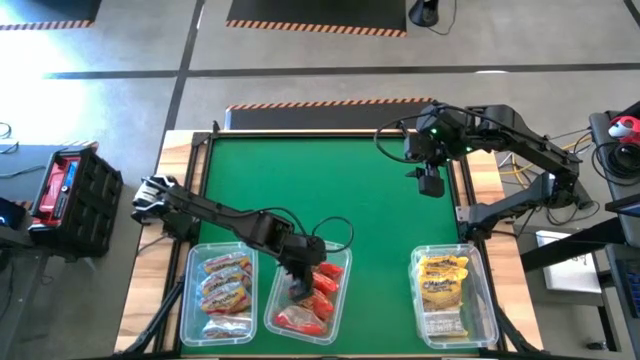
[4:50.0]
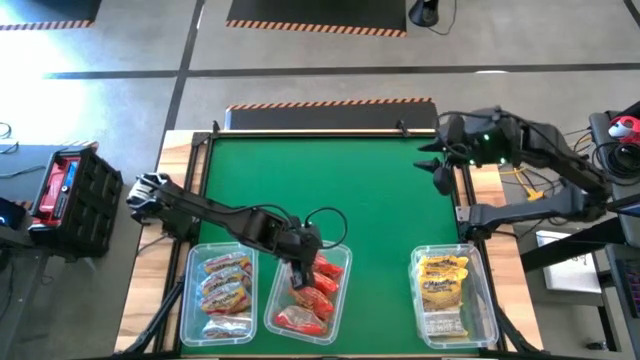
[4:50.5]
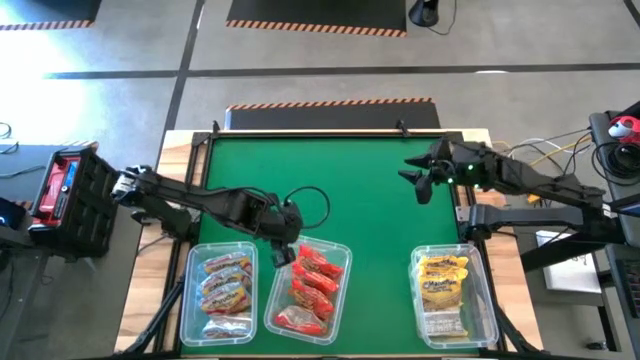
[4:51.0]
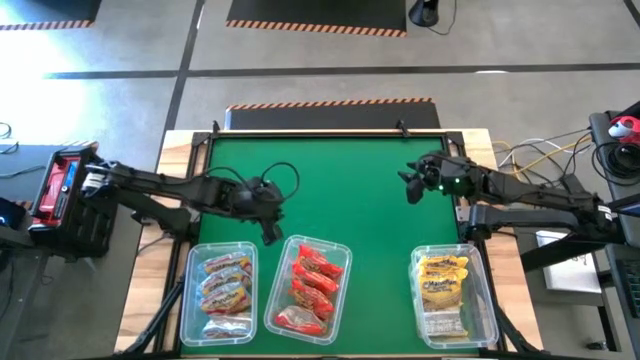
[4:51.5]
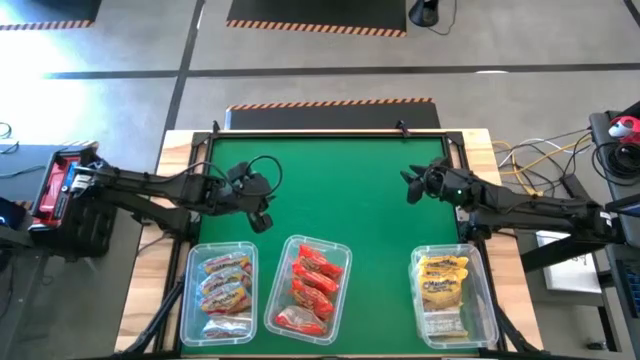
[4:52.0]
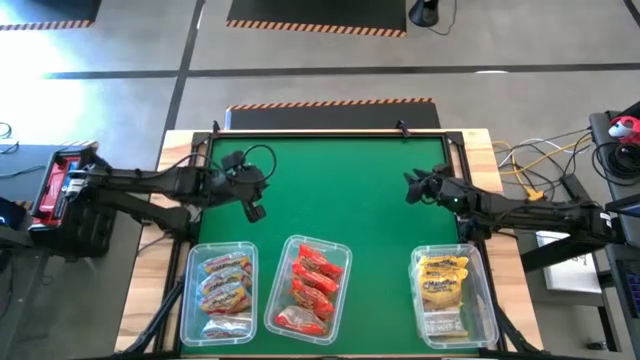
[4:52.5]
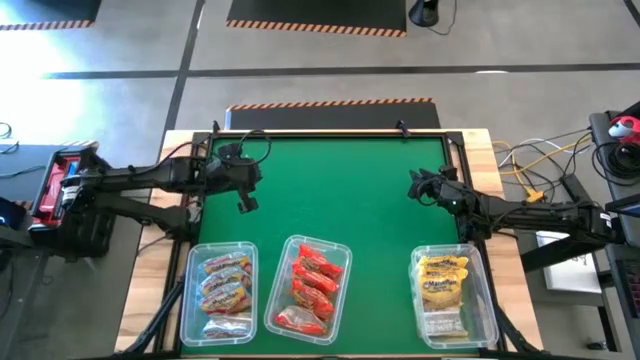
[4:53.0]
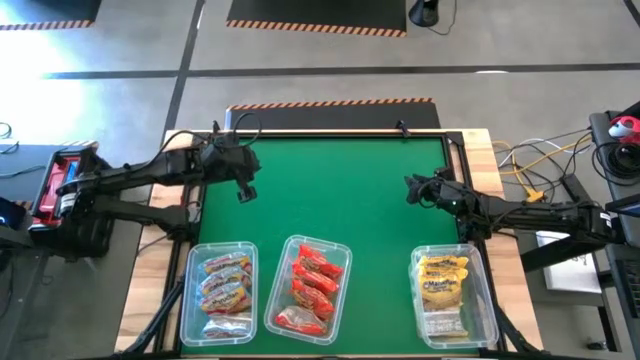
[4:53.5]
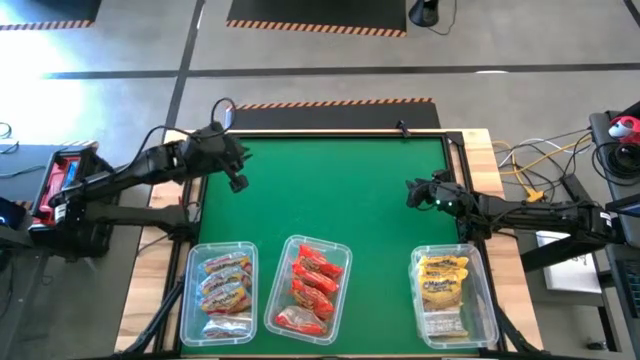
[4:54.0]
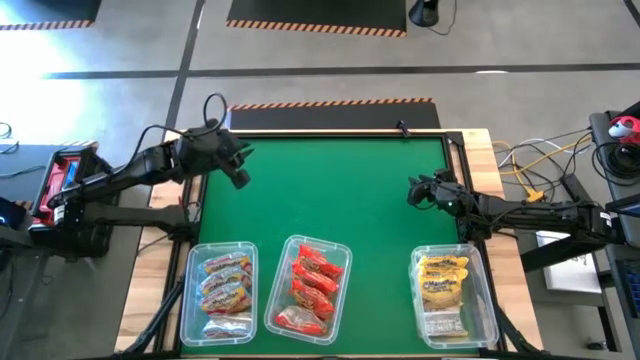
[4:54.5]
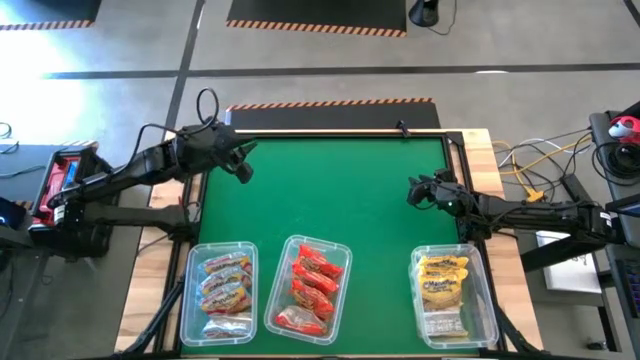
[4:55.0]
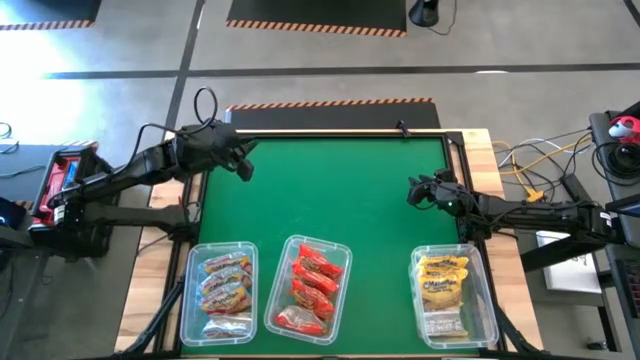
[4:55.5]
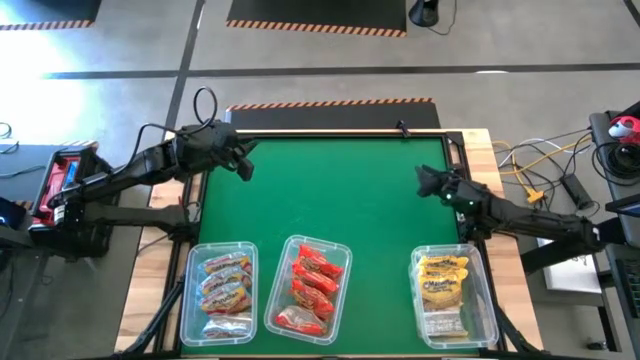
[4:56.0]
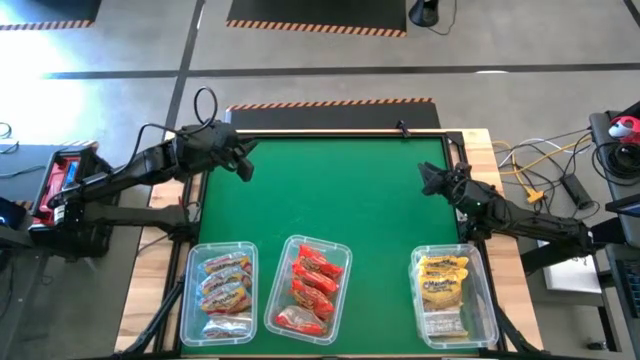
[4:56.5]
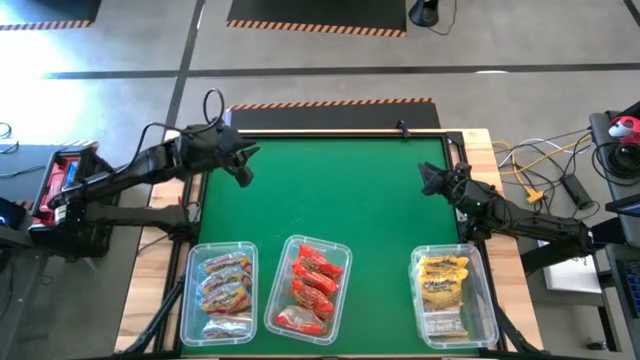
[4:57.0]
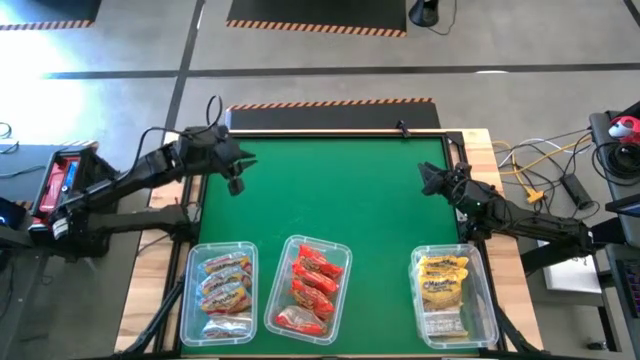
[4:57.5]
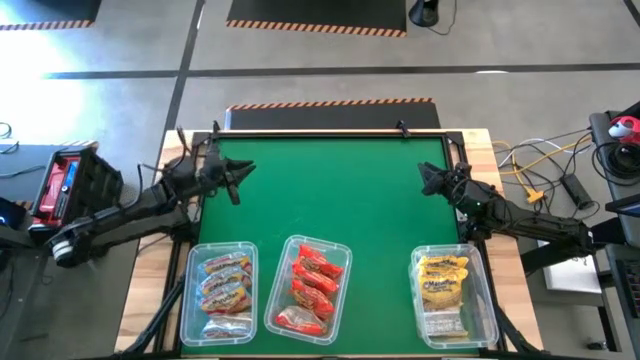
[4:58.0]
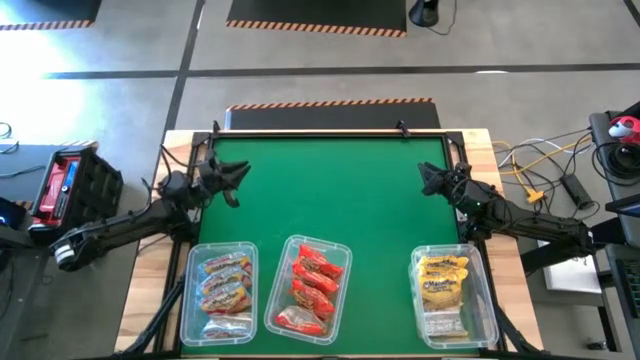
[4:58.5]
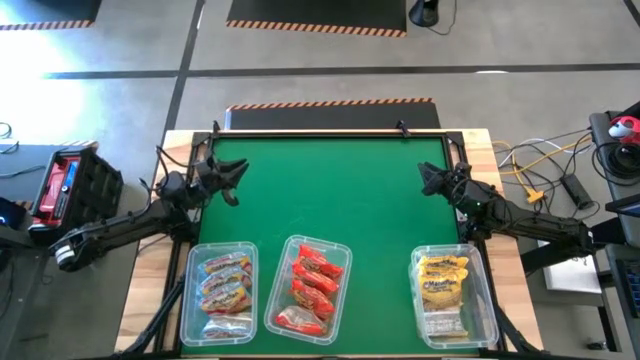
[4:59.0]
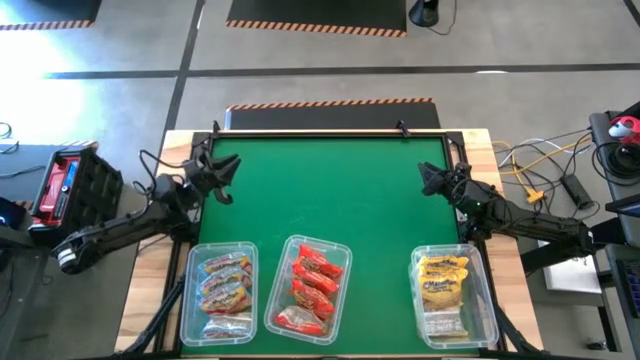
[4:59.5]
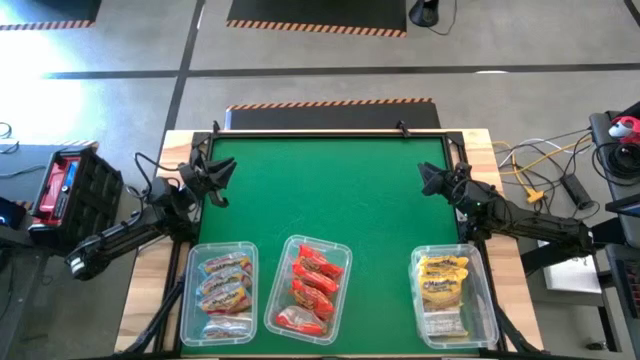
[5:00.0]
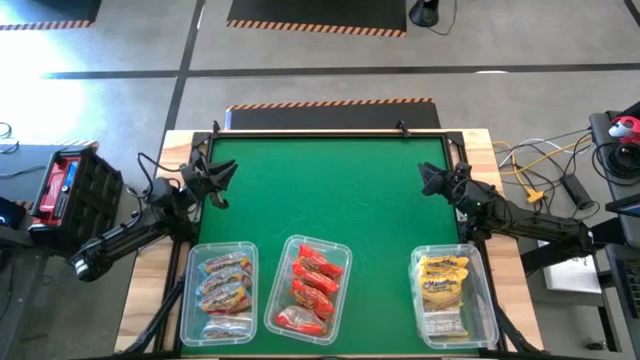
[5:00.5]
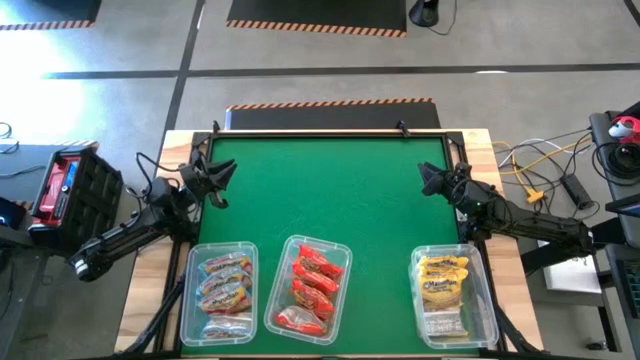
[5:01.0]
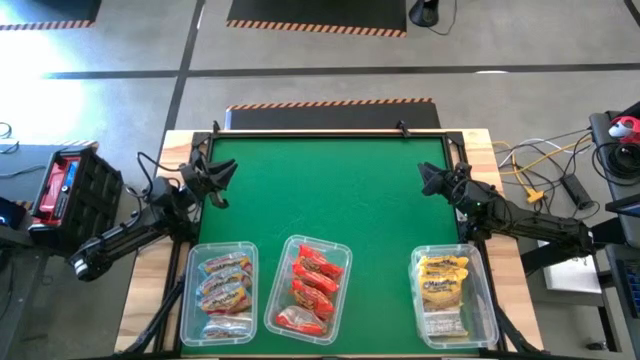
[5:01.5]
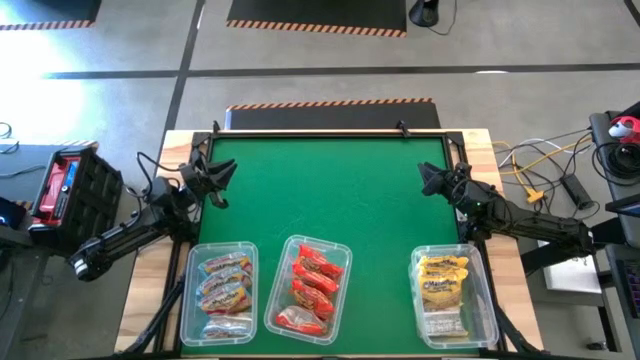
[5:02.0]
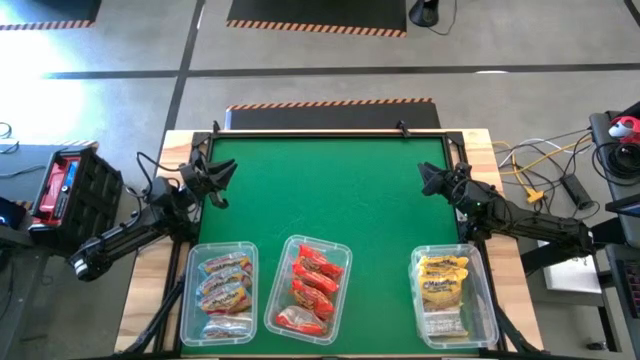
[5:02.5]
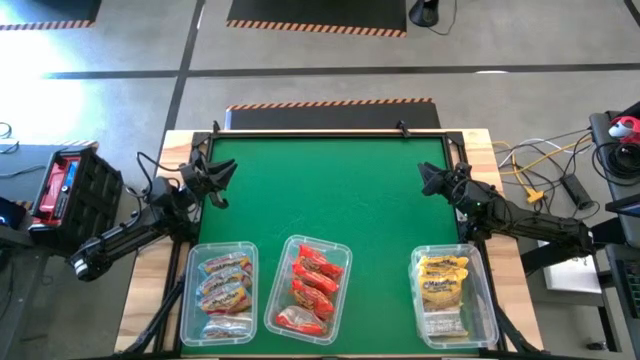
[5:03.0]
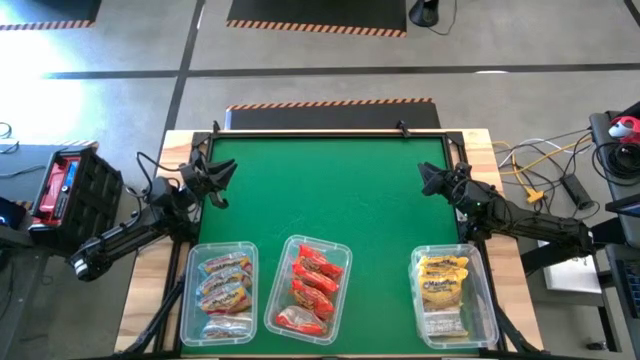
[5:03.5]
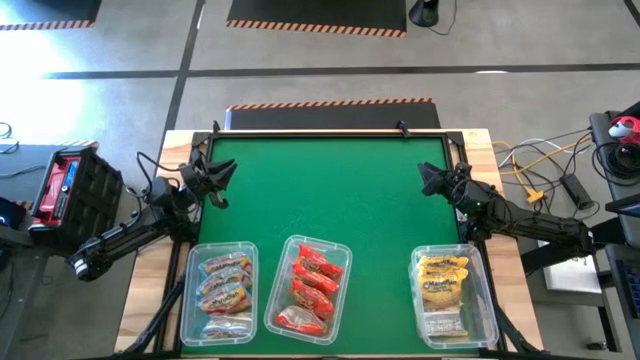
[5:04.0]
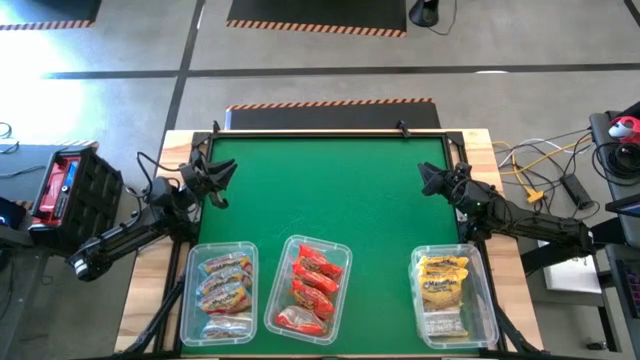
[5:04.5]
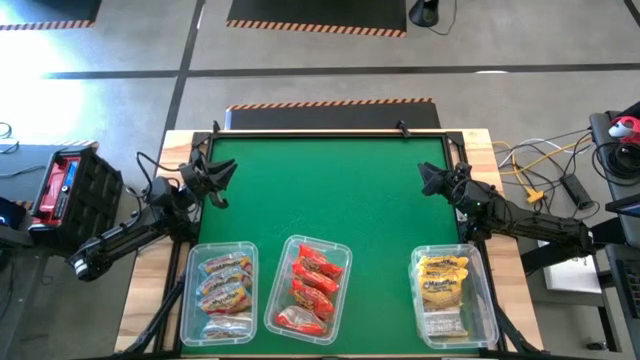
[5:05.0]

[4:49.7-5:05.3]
Task: Sort Maruchan noodles
Return to Home Position

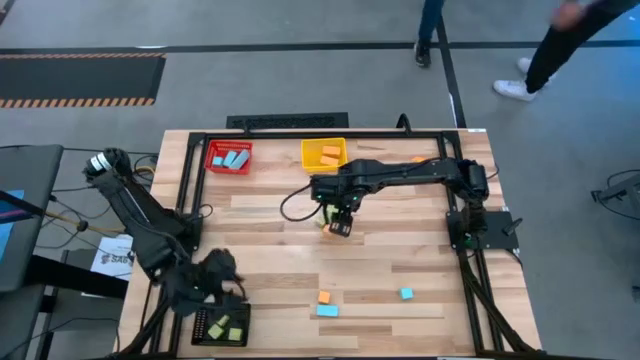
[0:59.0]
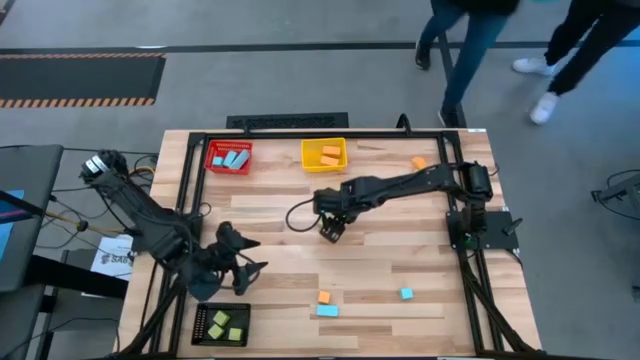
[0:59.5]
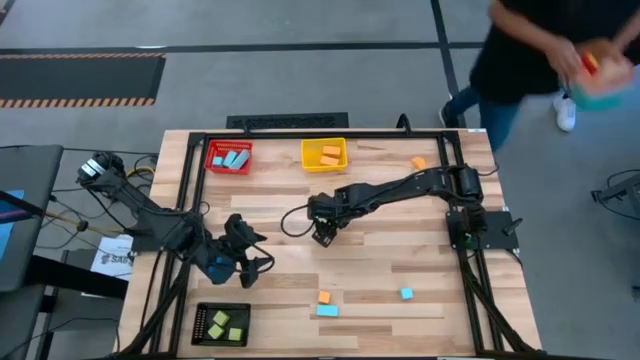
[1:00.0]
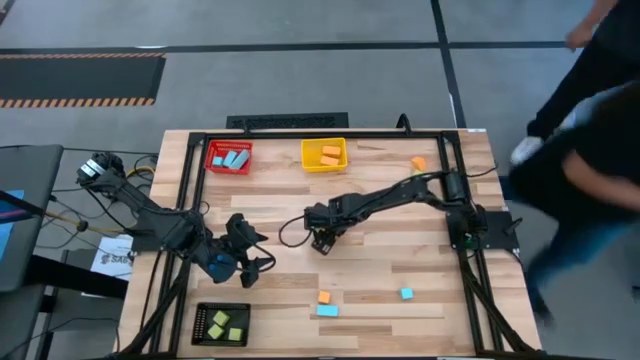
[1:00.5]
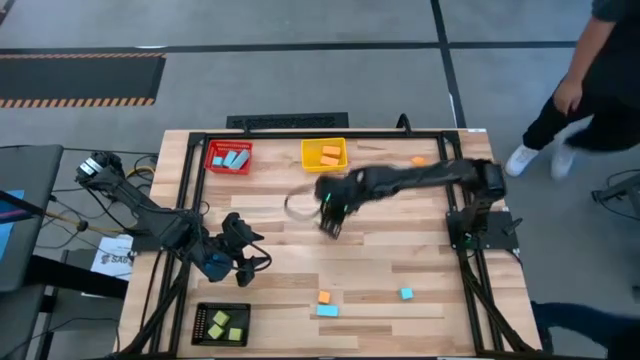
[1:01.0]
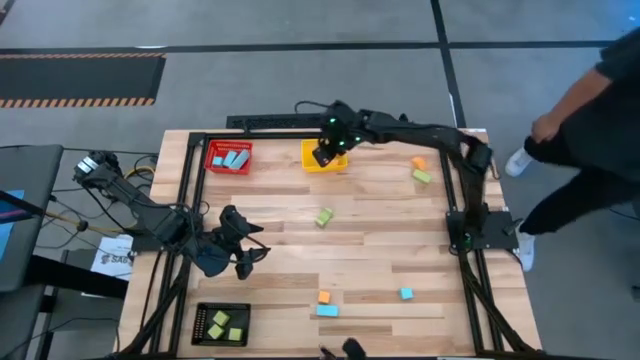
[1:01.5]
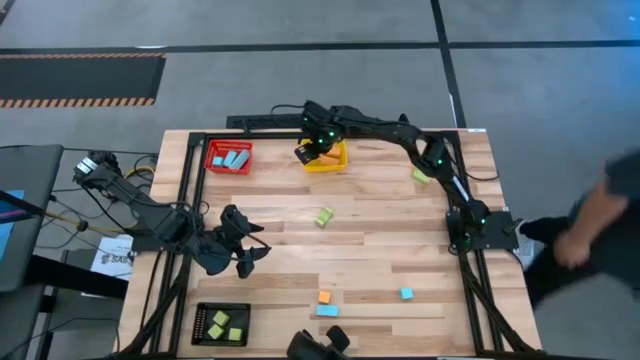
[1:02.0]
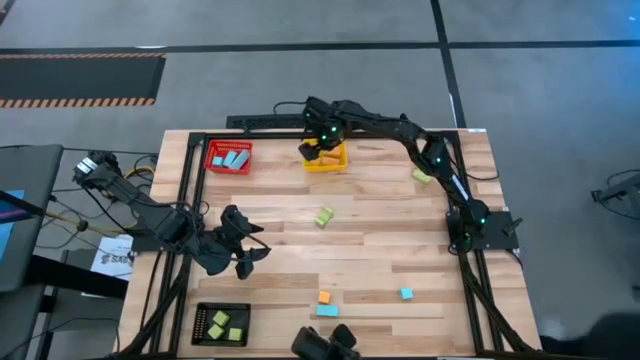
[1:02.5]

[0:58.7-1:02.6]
Task: Sort & place blocks by color
Put the wooden yellow block into the yellow bin

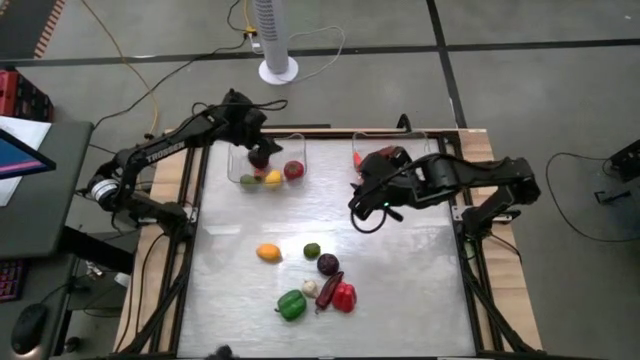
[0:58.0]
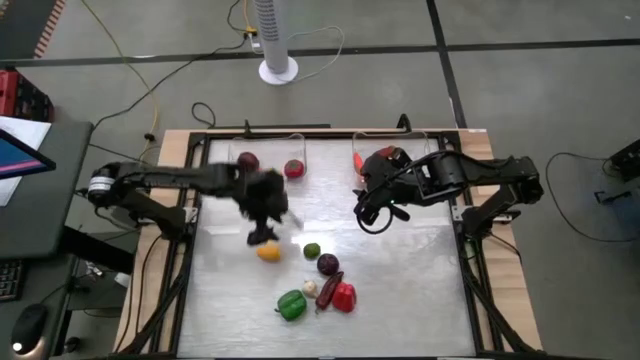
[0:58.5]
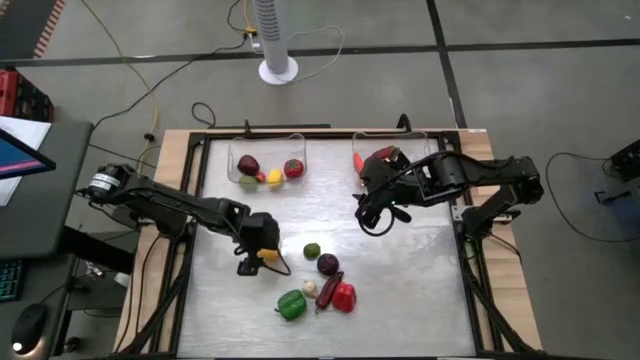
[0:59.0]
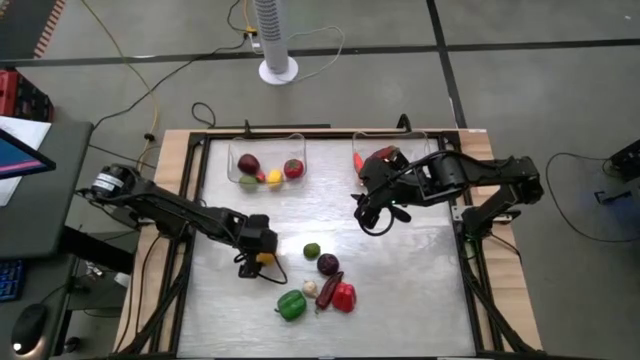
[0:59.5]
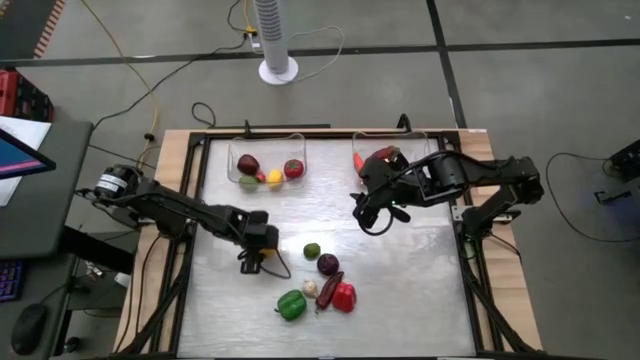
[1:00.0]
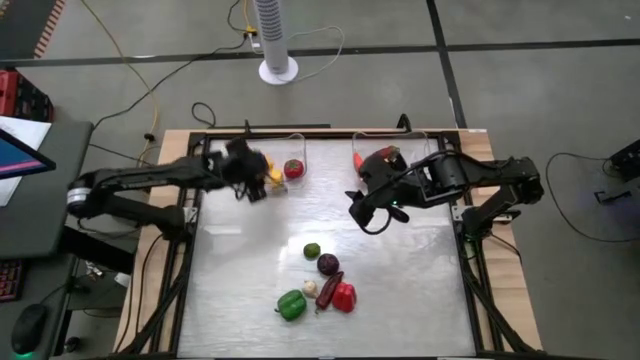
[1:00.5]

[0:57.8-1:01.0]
Task: Sort produce into baskets
Put the yellow lemon into the left transparent bin
